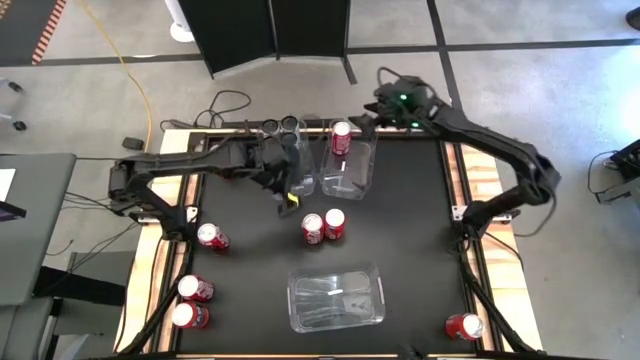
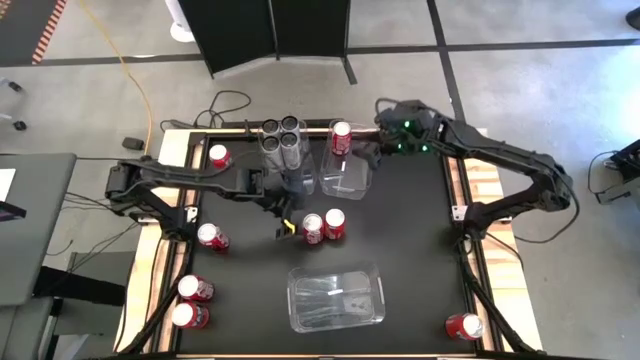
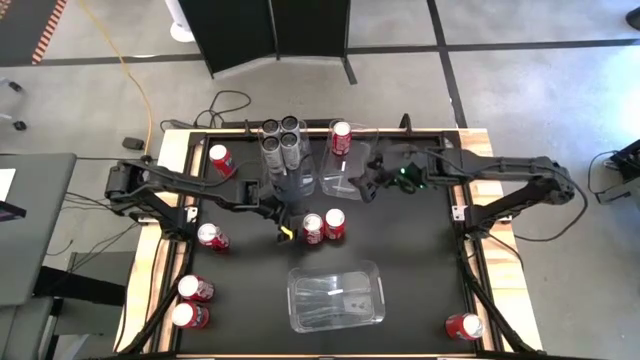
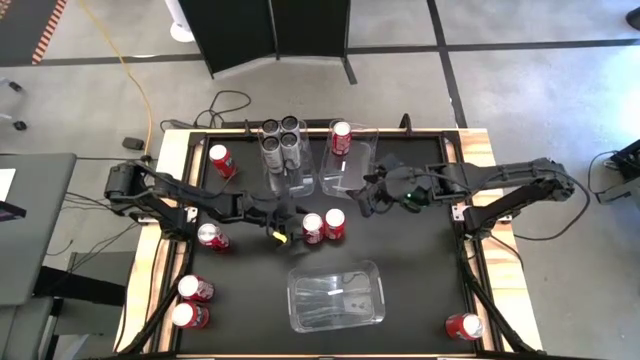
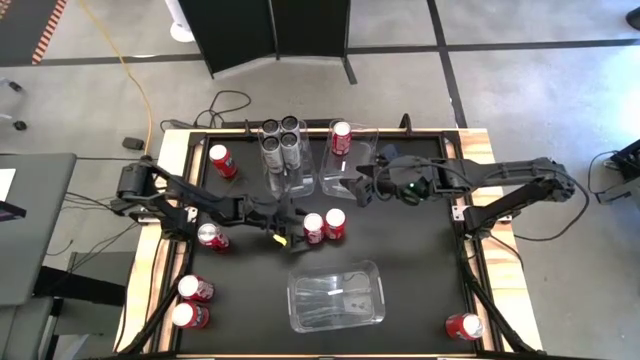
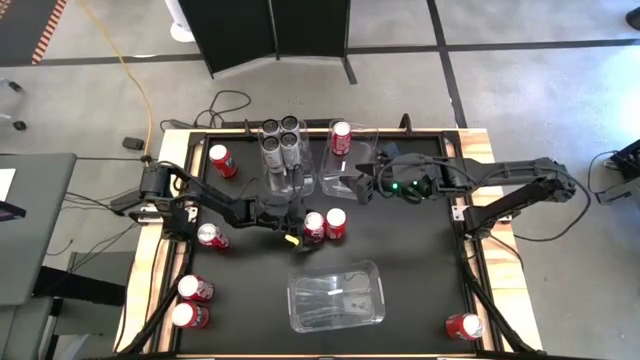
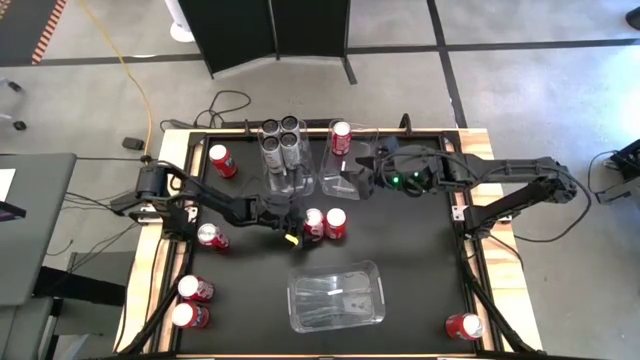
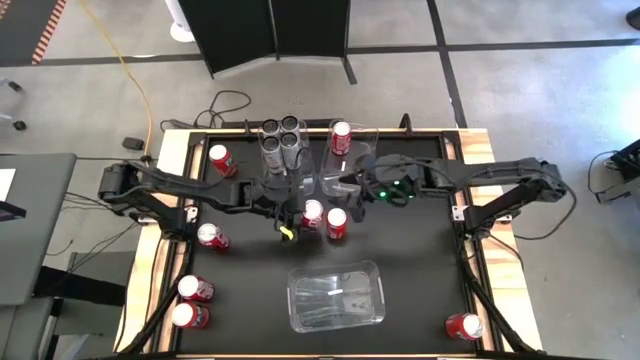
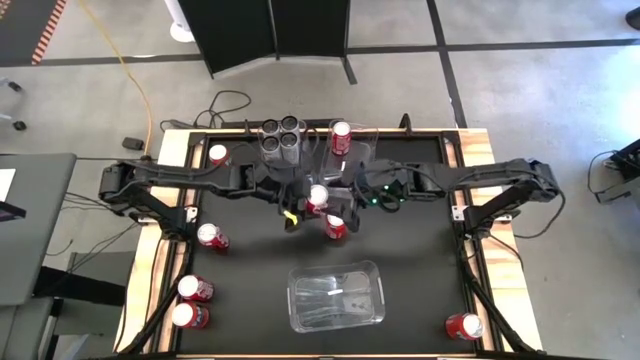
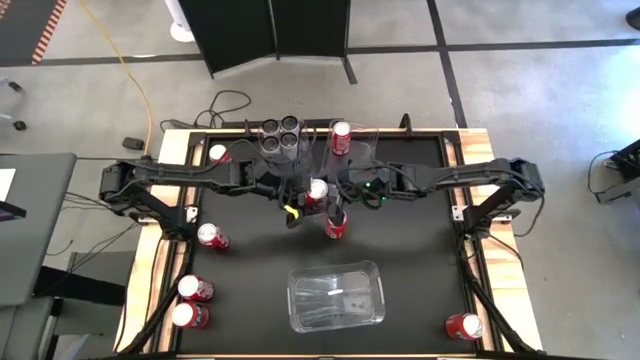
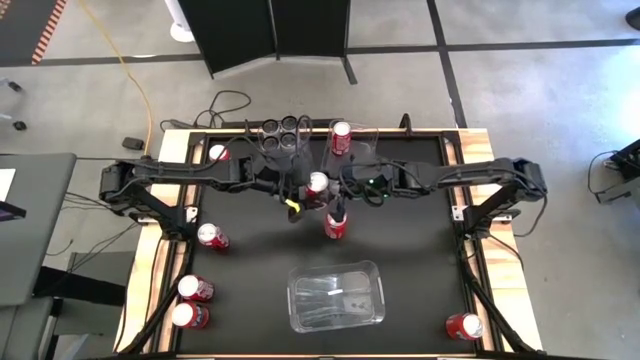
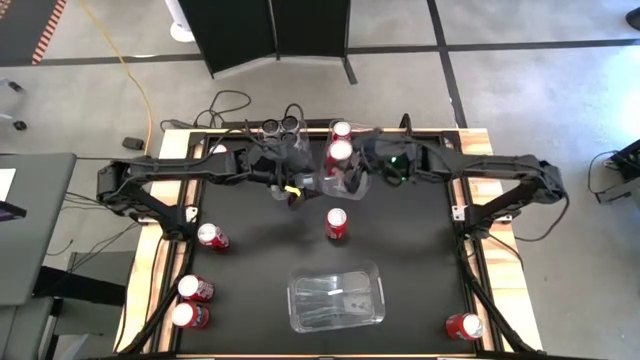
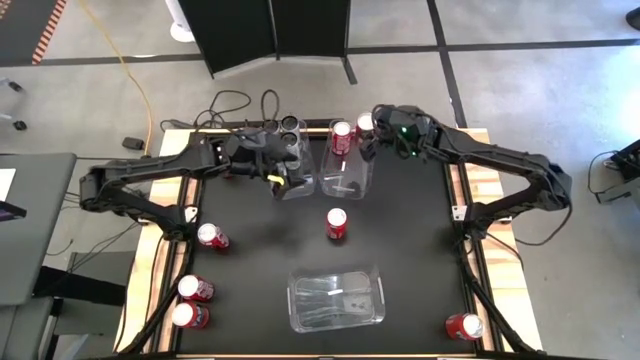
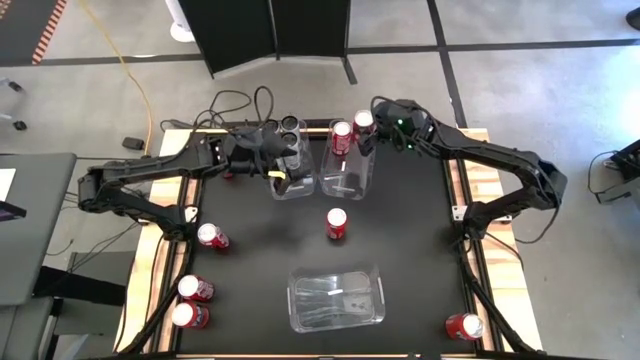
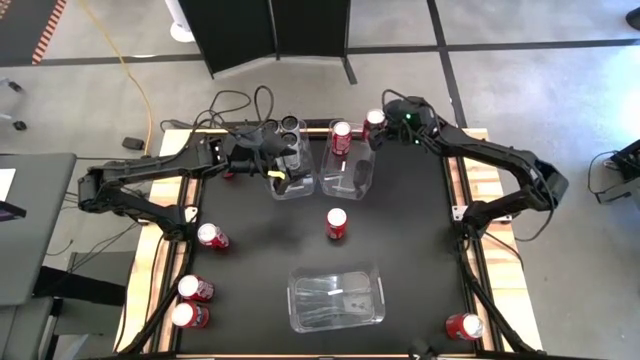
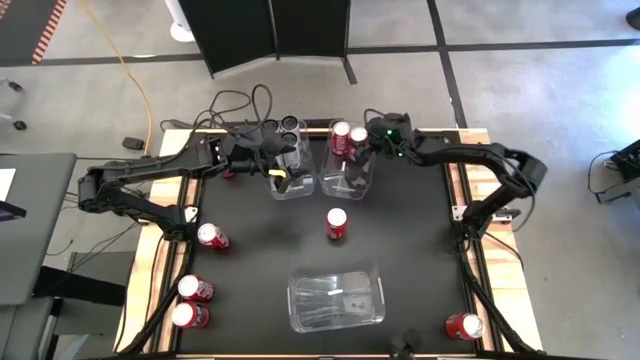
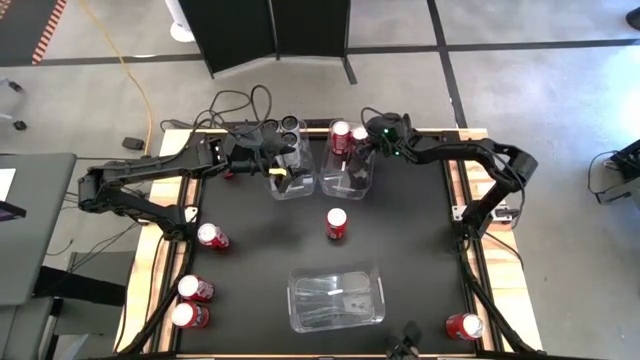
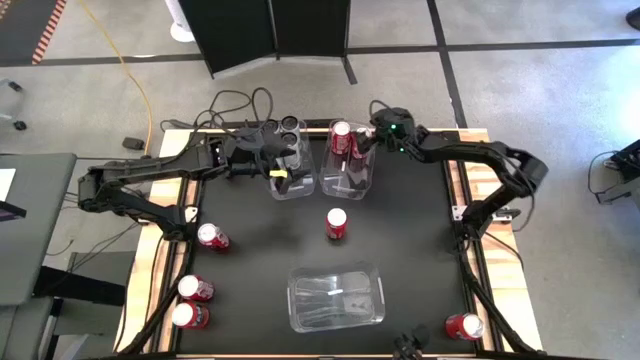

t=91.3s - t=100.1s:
Task: Sort soda cans
Put the top right red soda can into the top right transparent bin

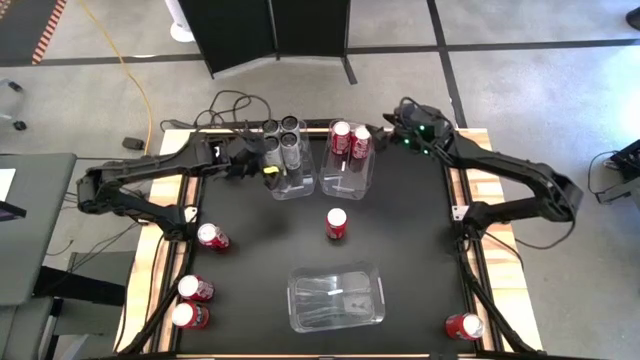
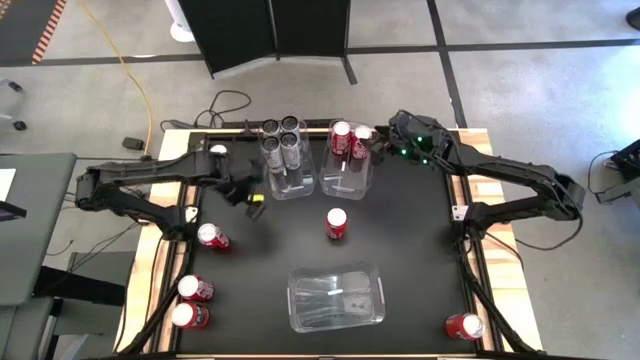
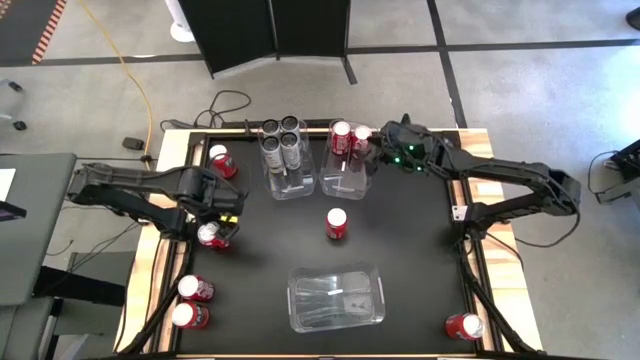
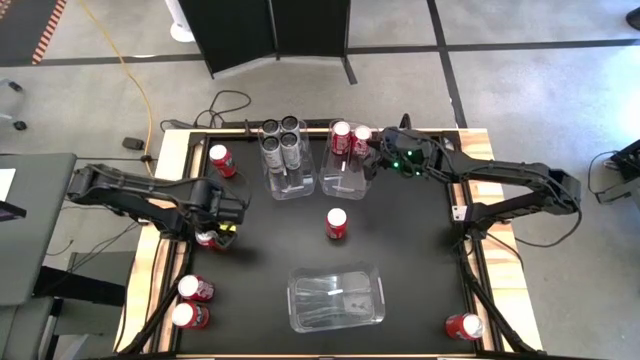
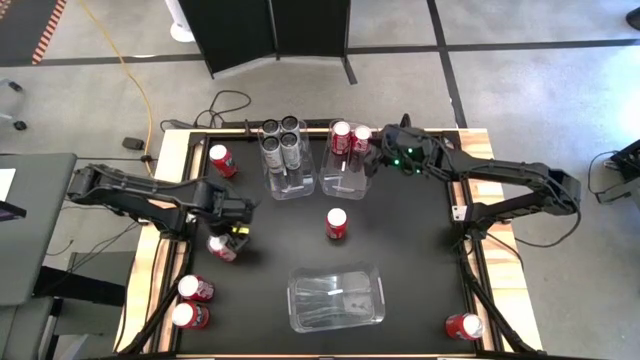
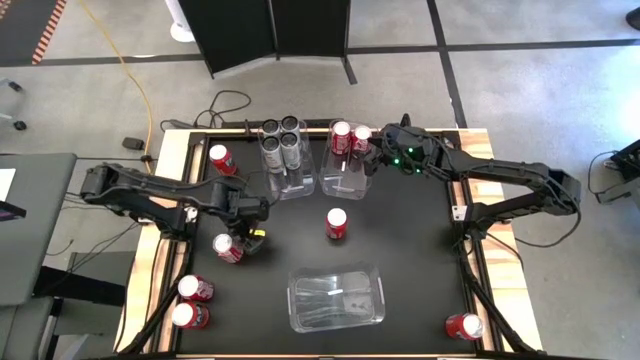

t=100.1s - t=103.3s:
Put the top red soda can into the top right transparent bin

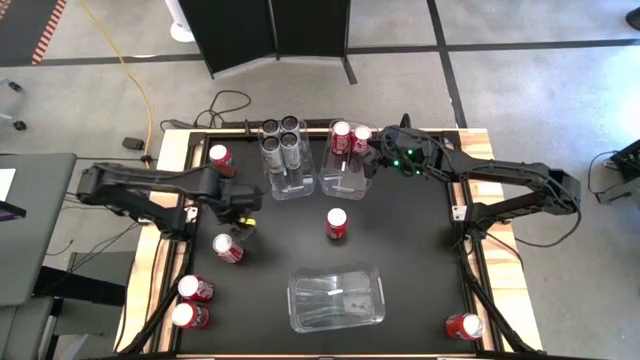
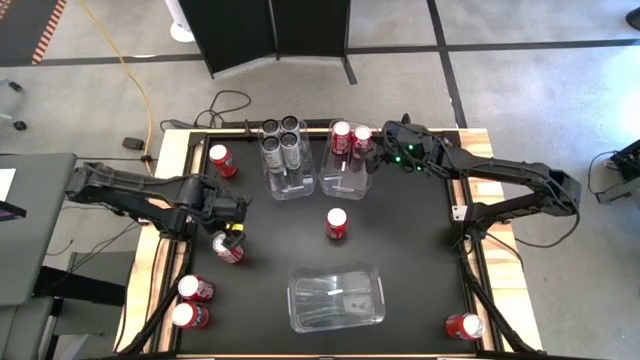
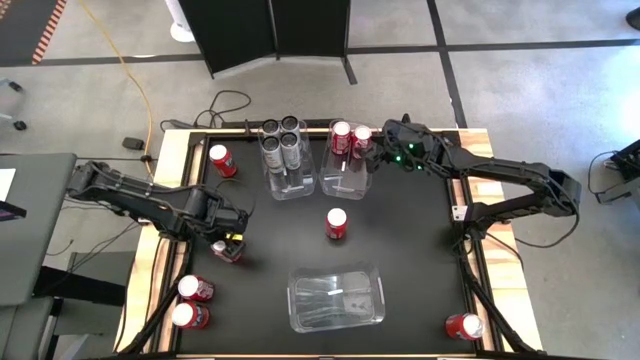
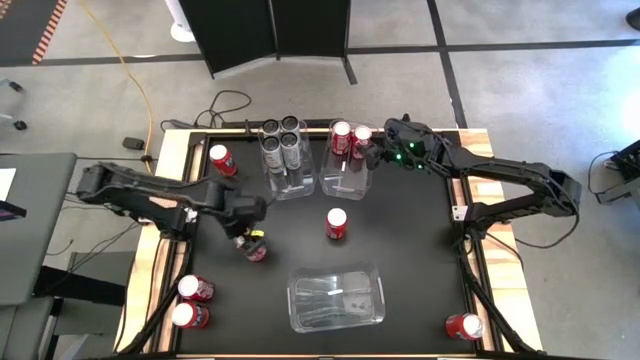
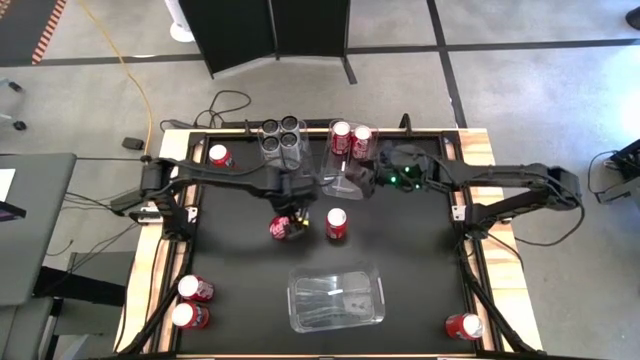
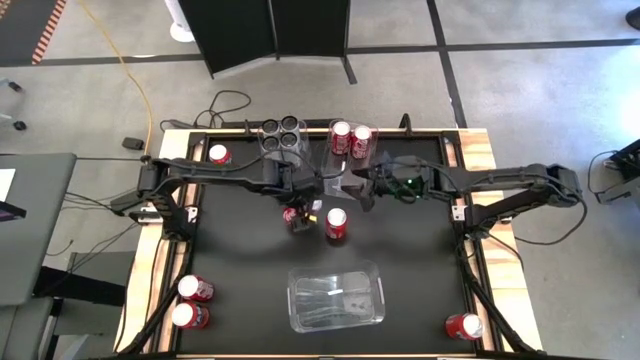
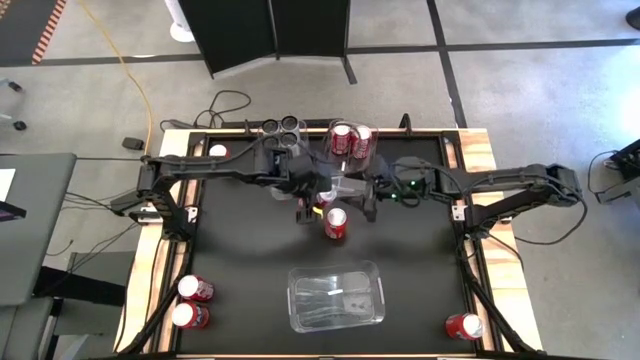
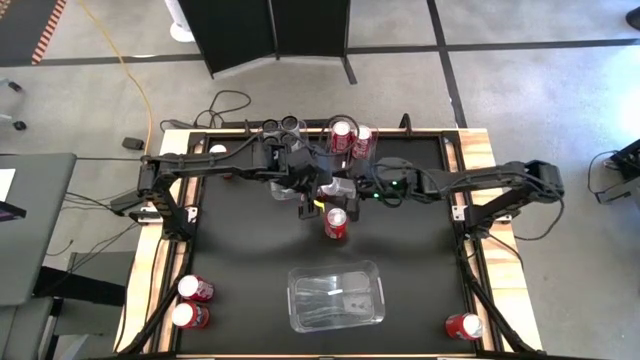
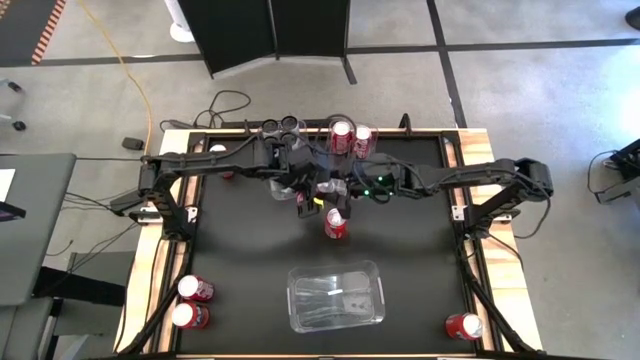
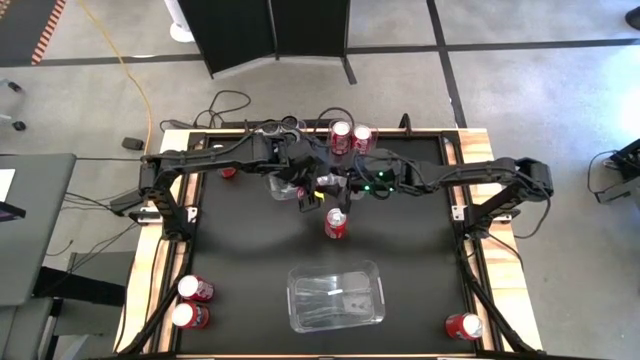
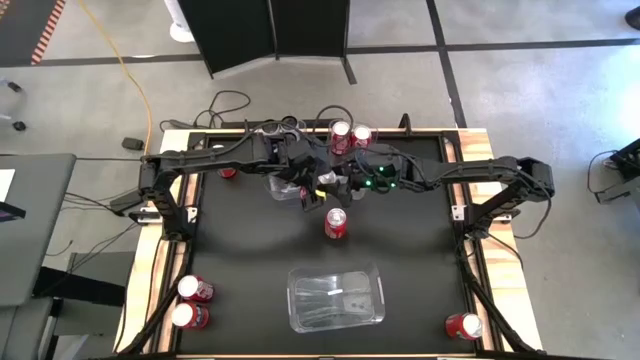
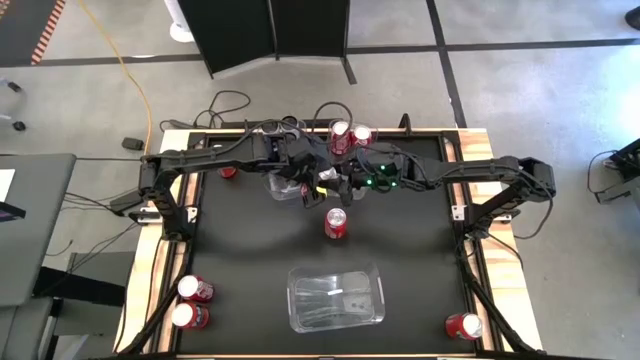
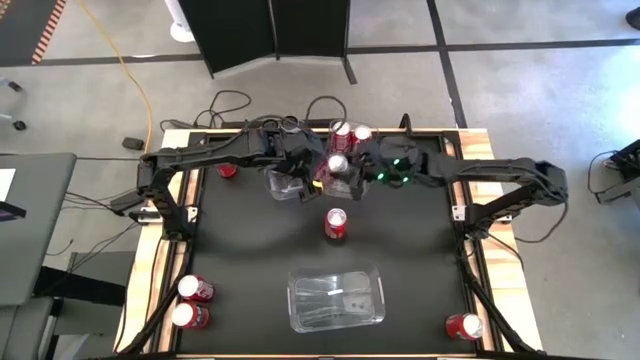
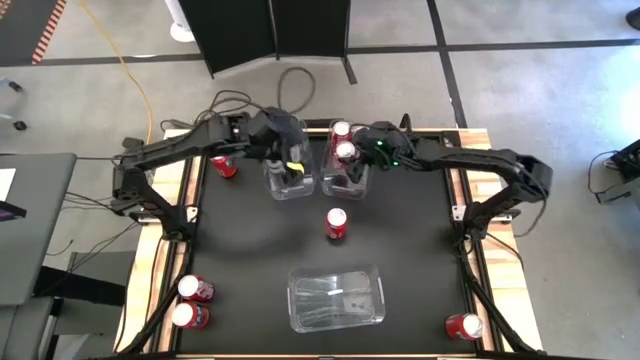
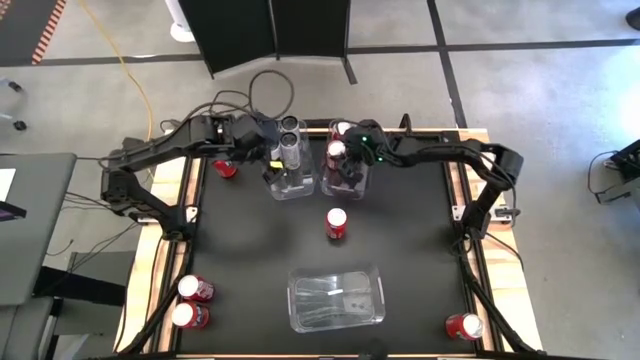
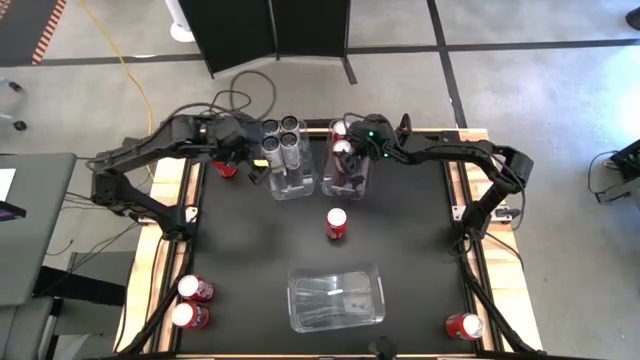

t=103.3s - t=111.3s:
Put the top red soda can into the top right transparent bin

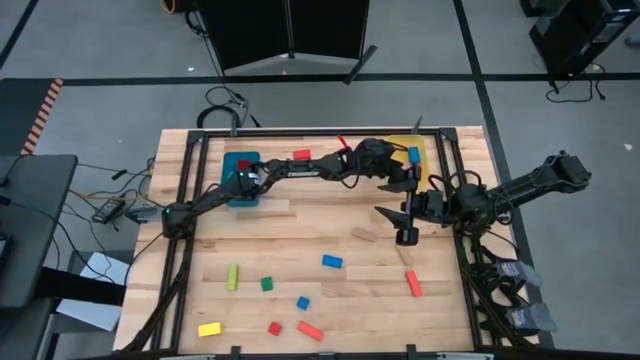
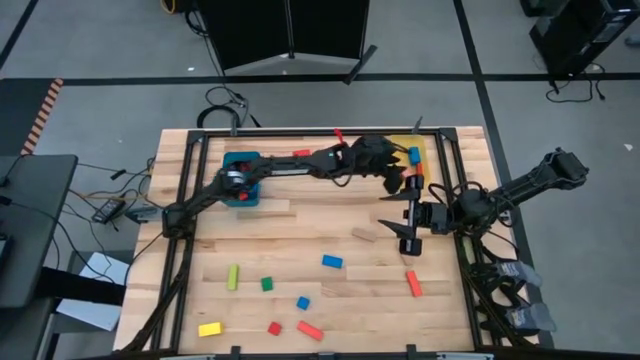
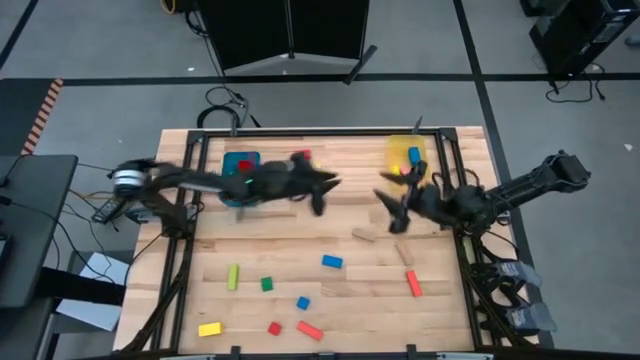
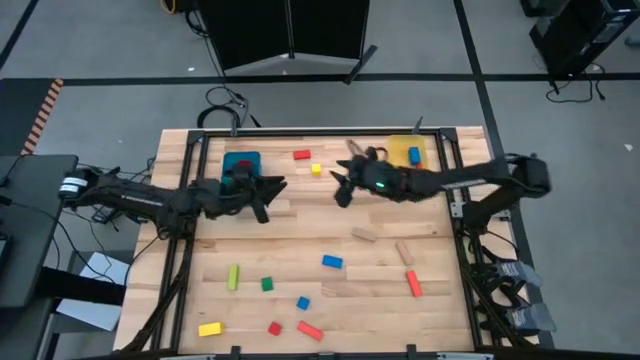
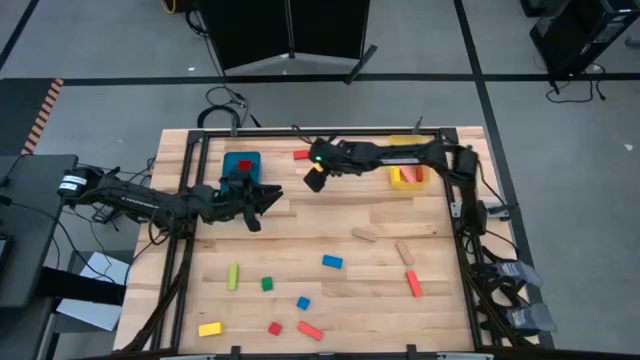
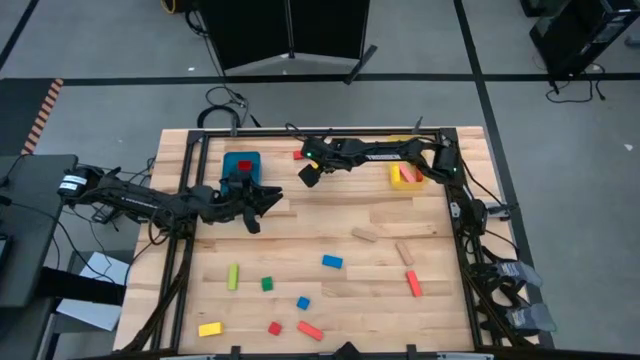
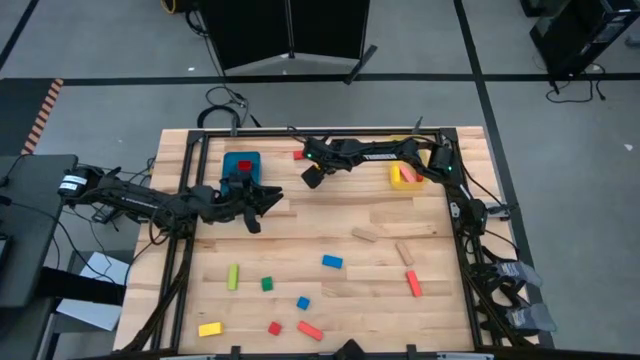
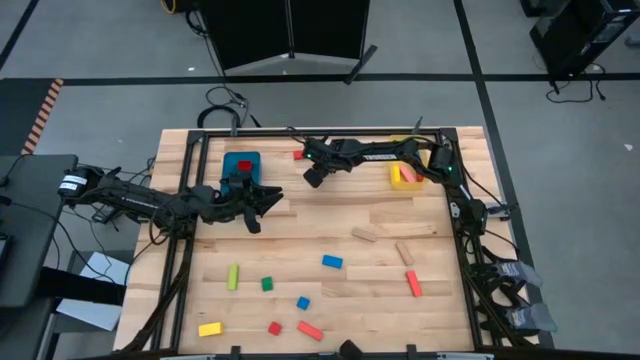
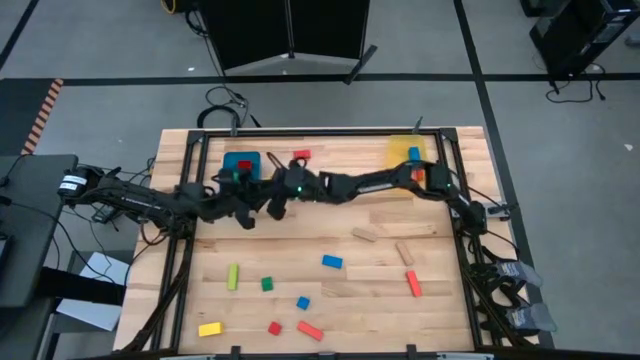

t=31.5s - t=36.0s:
Task: Sort blocks by size
Put the small yellow block into the blue bin
